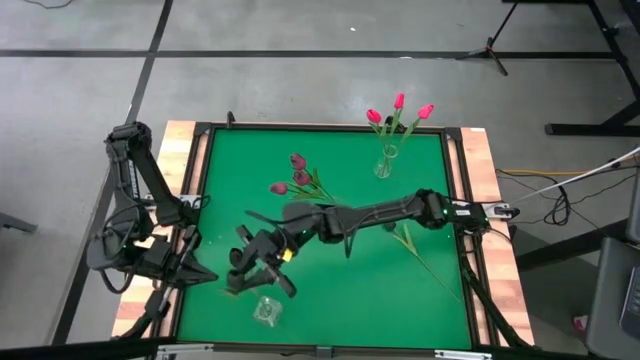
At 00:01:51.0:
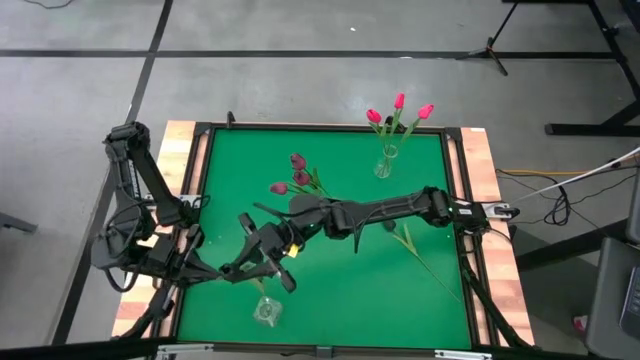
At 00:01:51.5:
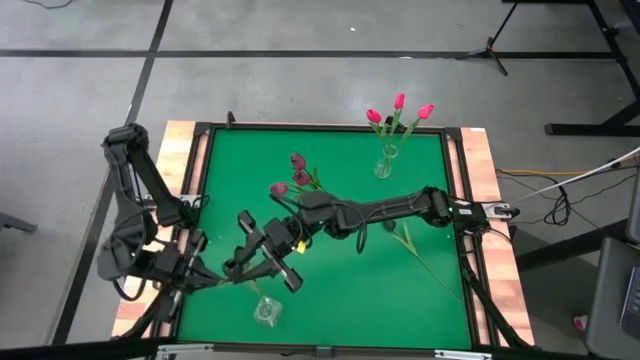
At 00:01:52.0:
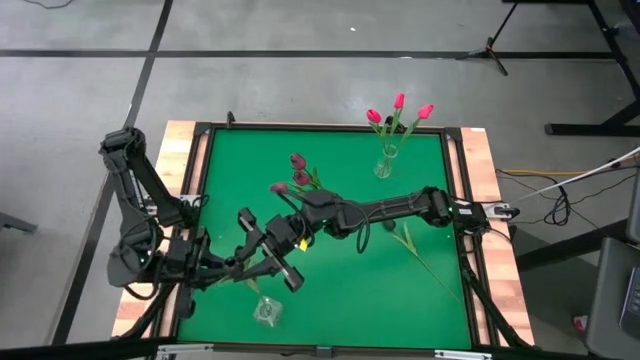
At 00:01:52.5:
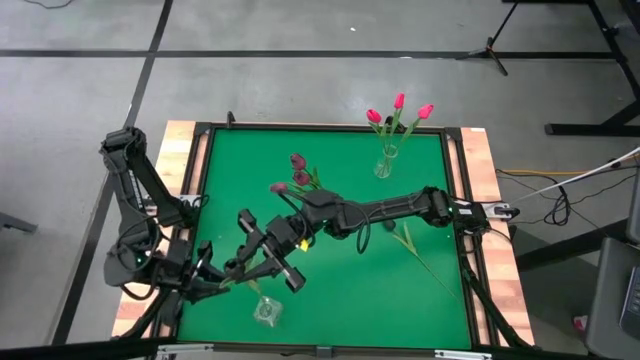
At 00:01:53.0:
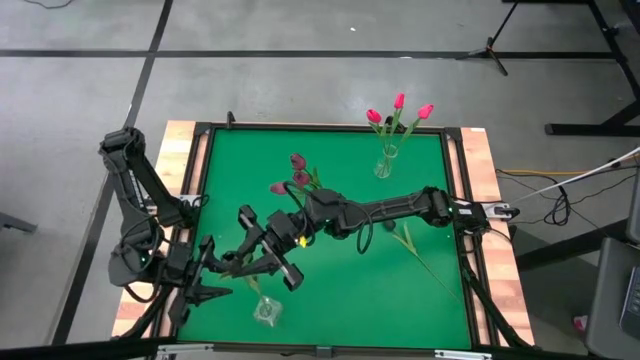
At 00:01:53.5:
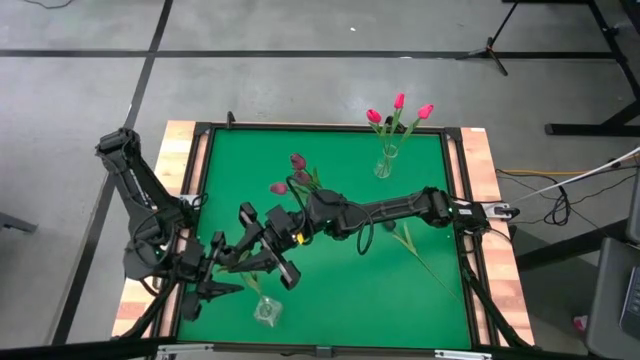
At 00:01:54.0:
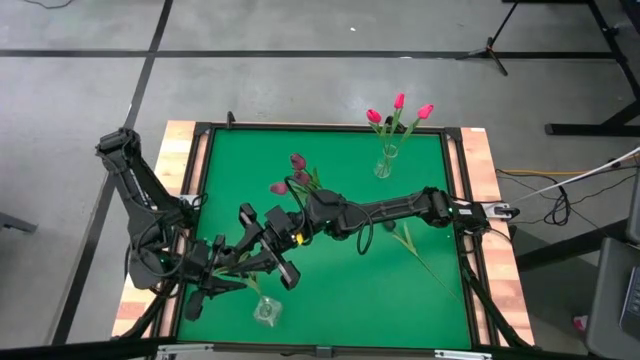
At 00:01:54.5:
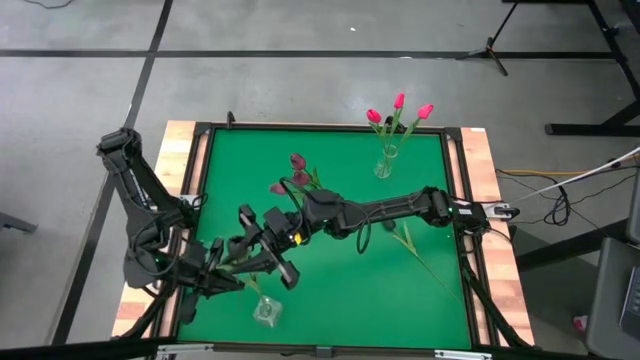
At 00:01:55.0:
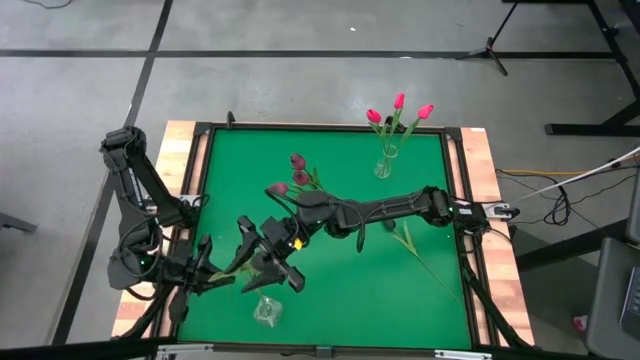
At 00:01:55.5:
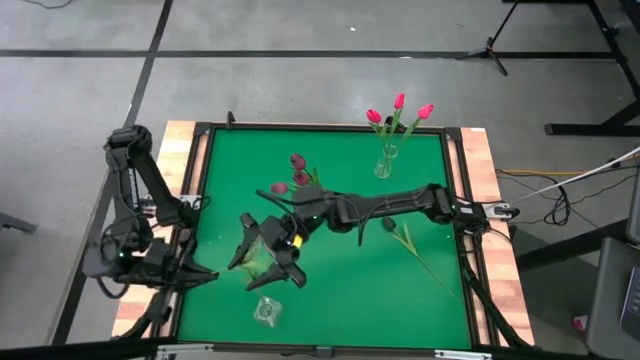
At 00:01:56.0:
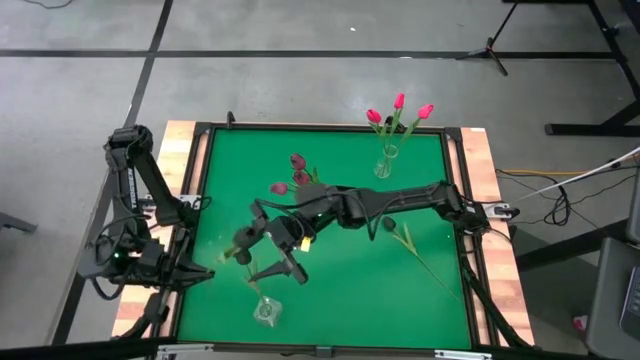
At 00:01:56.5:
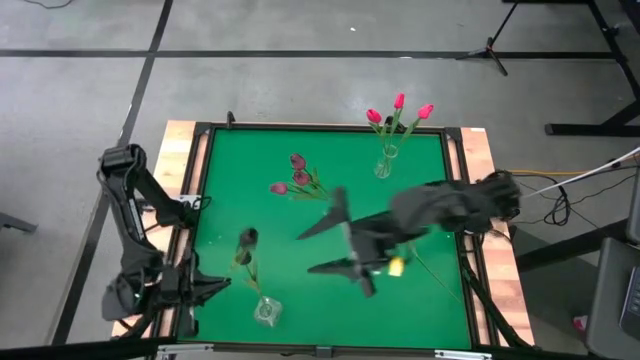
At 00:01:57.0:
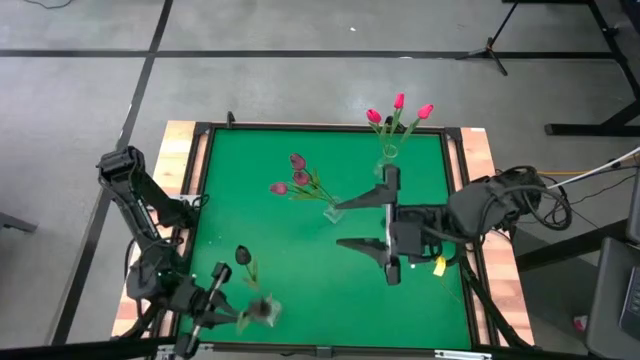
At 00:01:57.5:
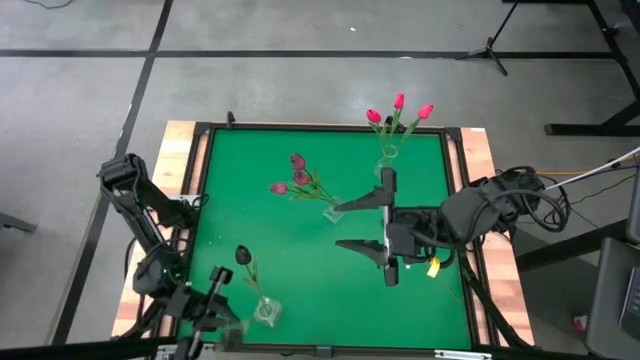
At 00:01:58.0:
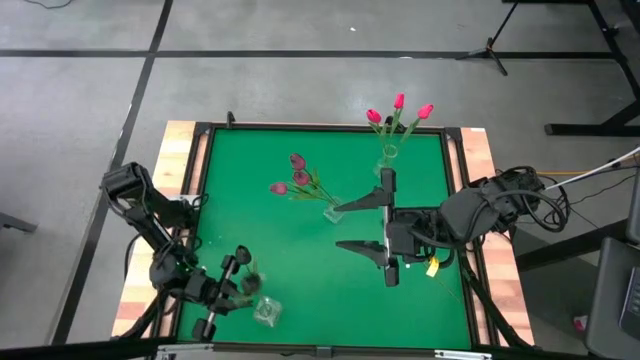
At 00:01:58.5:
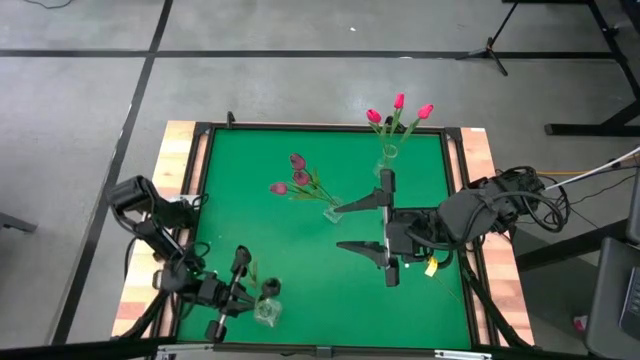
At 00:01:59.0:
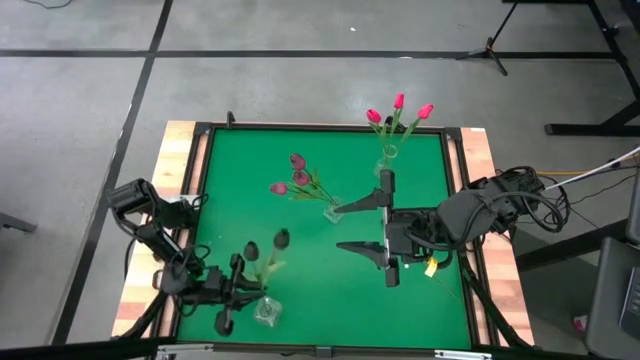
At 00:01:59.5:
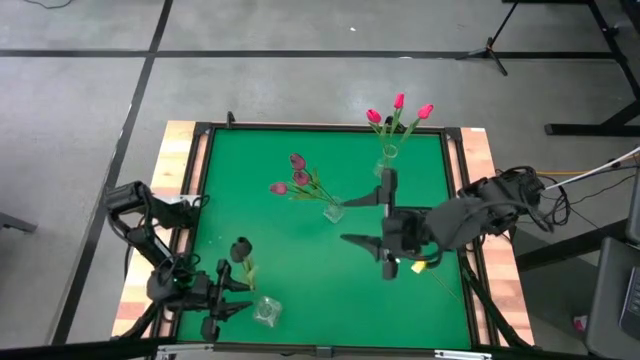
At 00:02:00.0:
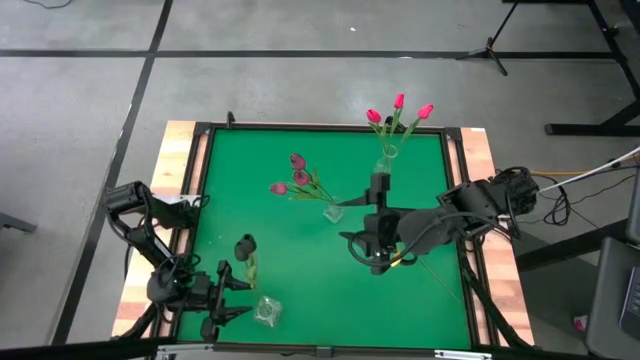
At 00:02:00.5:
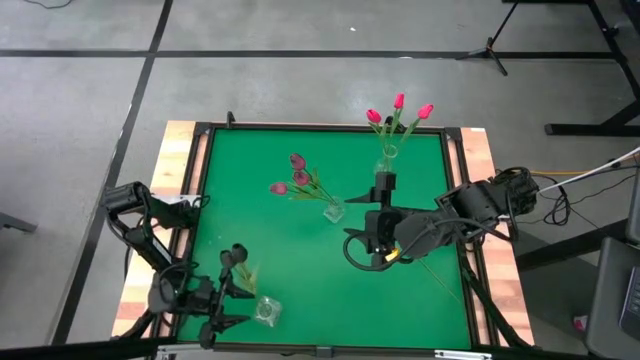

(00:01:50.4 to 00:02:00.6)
Task: Sort flowers into vase by color
Put the left black tulip into the bottom transparent vase

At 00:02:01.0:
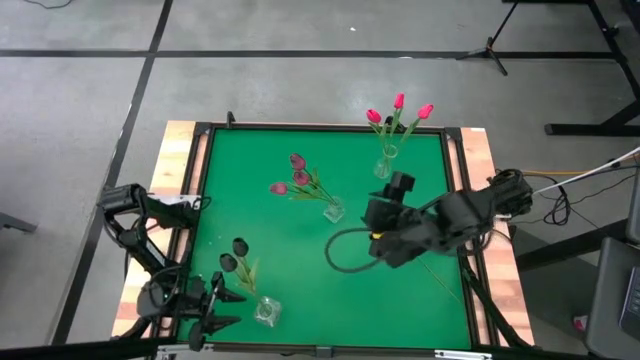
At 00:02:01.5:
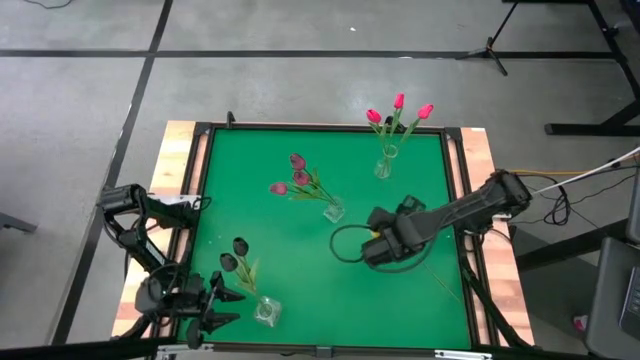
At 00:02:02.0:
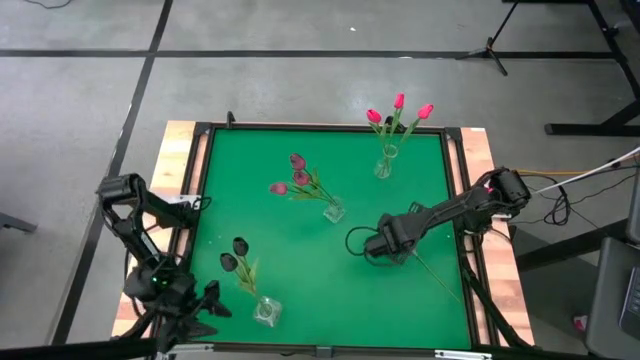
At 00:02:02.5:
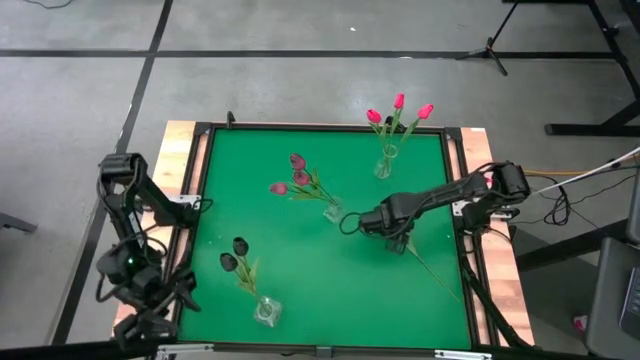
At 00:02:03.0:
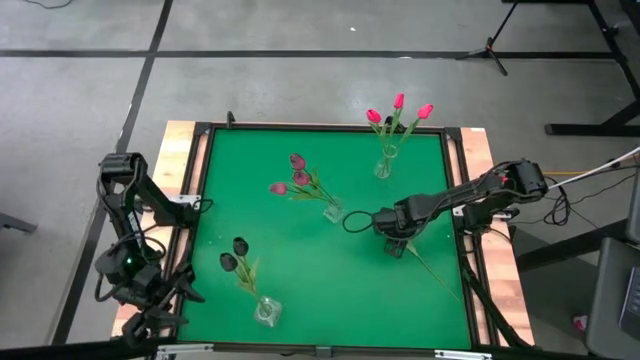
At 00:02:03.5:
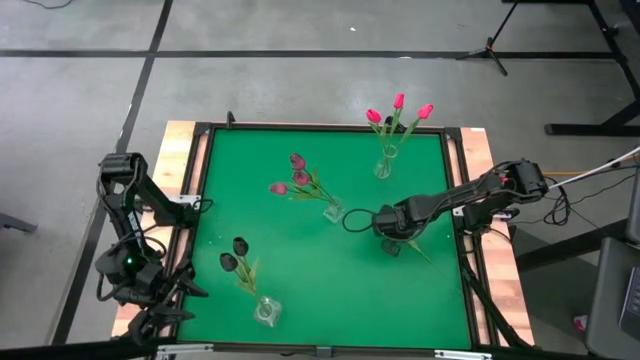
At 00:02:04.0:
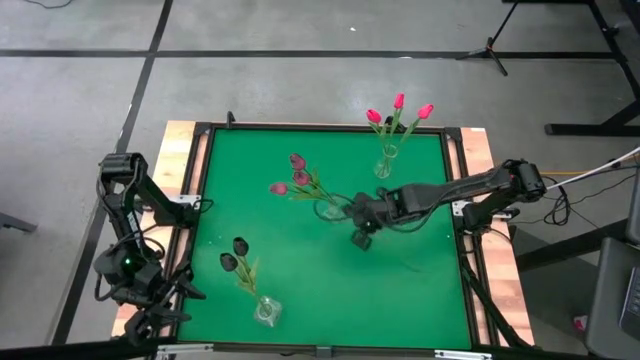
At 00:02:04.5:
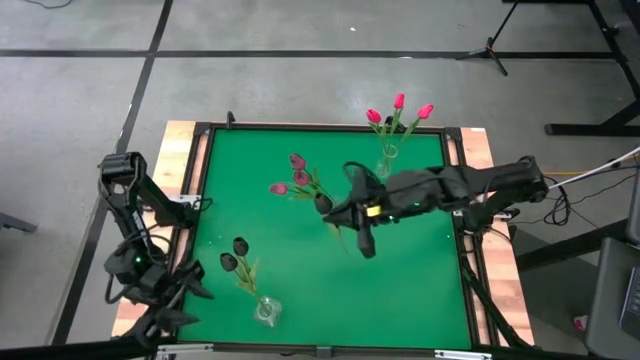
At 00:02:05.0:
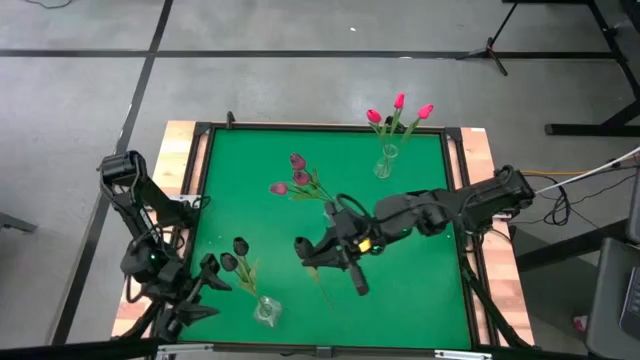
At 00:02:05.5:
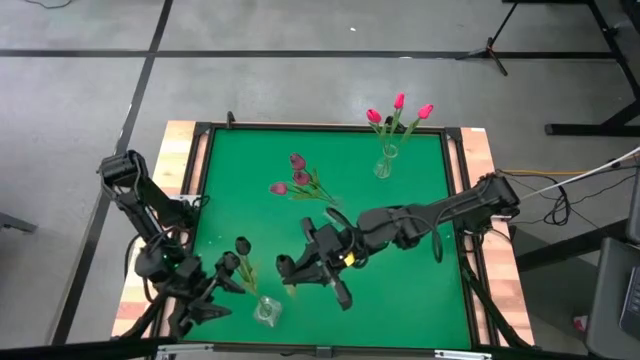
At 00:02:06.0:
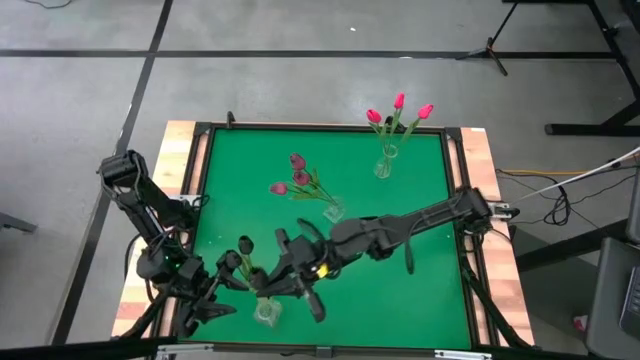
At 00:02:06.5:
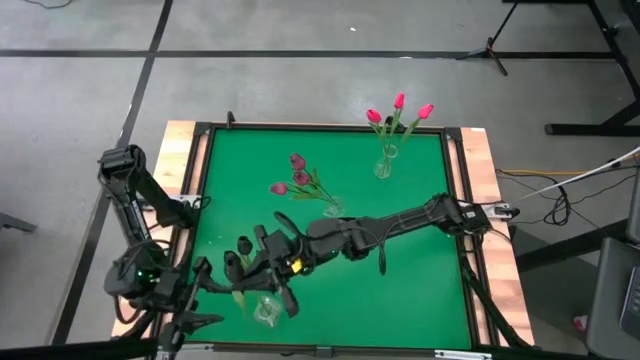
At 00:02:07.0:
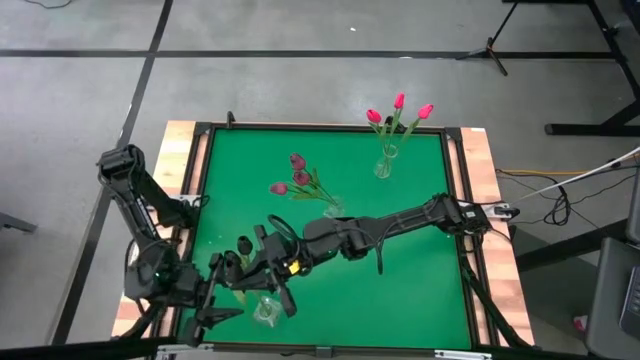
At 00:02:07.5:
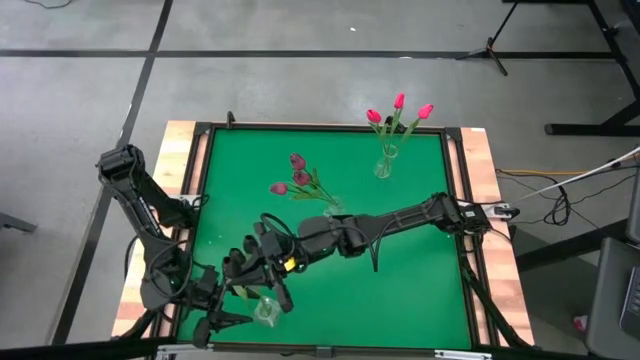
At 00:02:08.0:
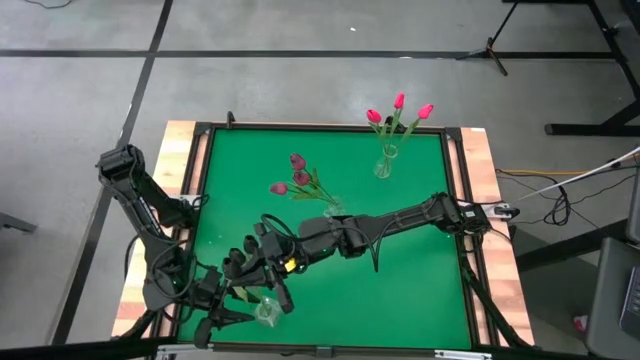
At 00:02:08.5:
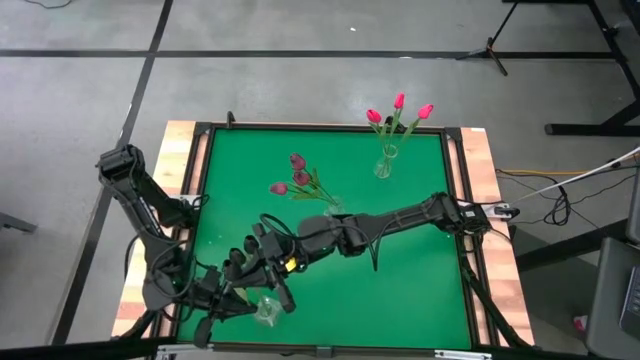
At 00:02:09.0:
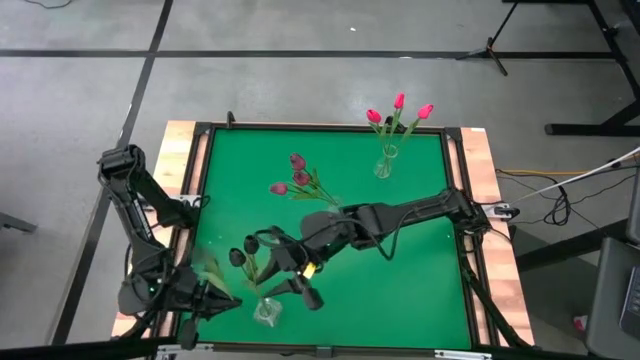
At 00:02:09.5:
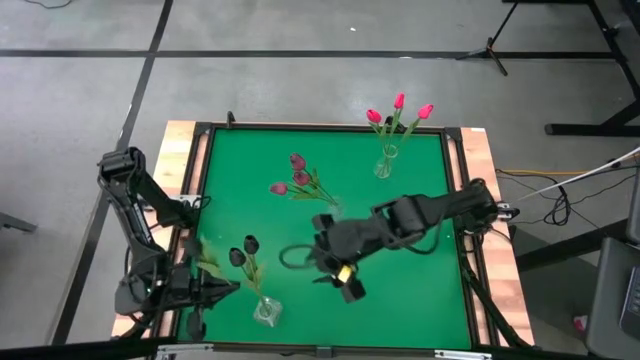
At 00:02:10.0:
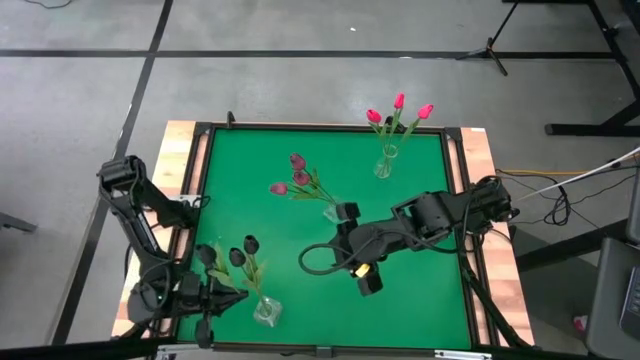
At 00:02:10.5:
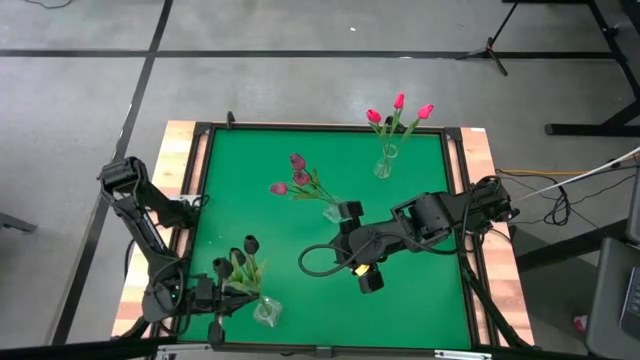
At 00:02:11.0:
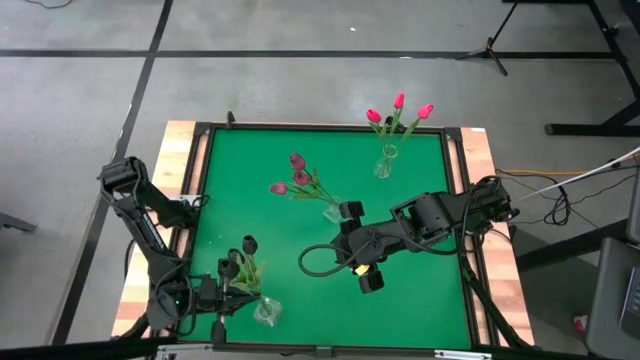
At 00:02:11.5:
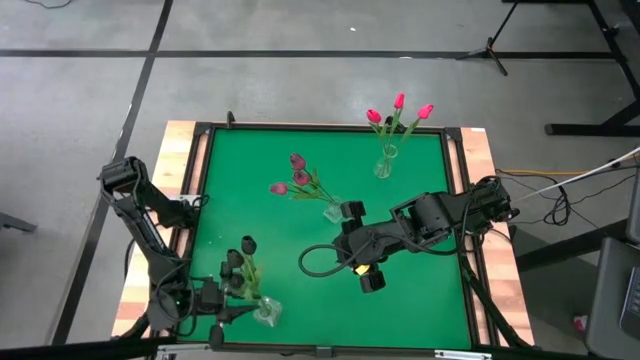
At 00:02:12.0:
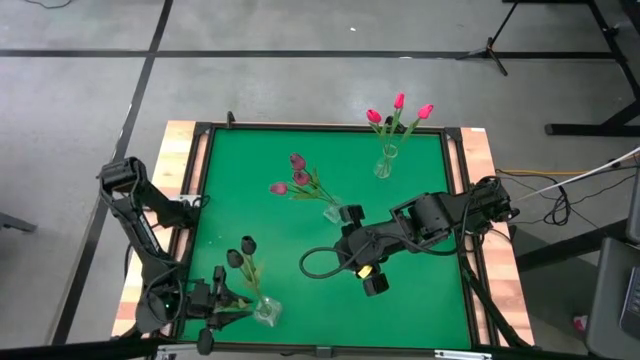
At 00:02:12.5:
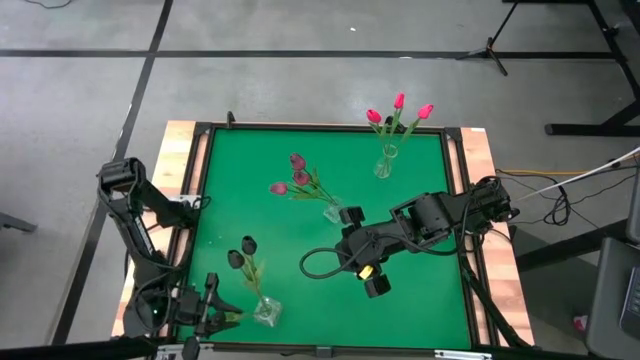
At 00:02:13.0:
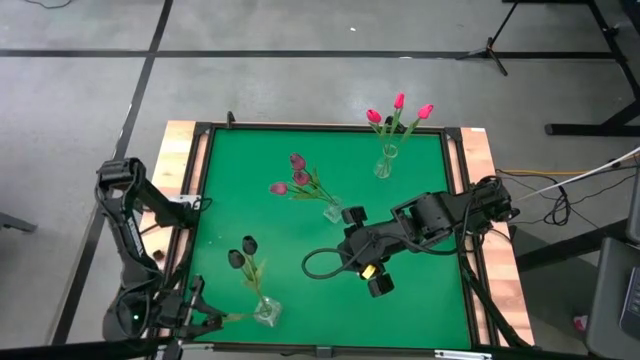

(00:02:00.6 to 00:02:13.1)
Put the black tulip into the bottom transparent vase
